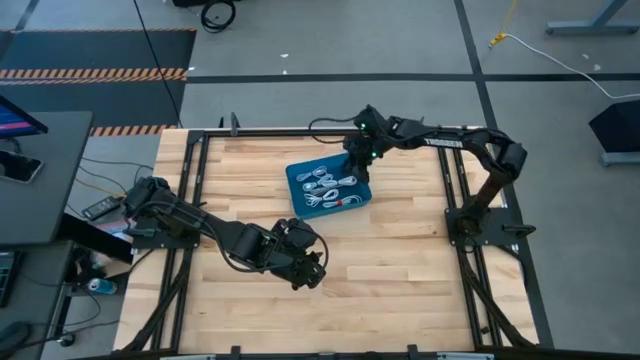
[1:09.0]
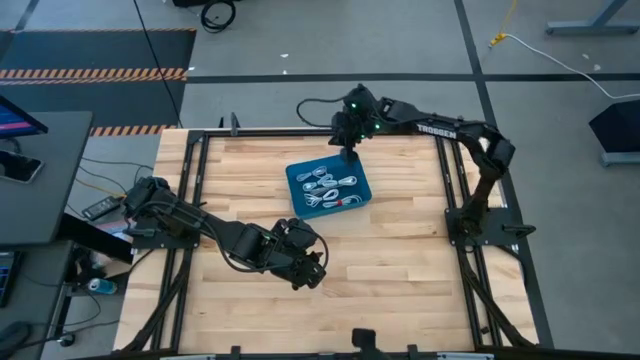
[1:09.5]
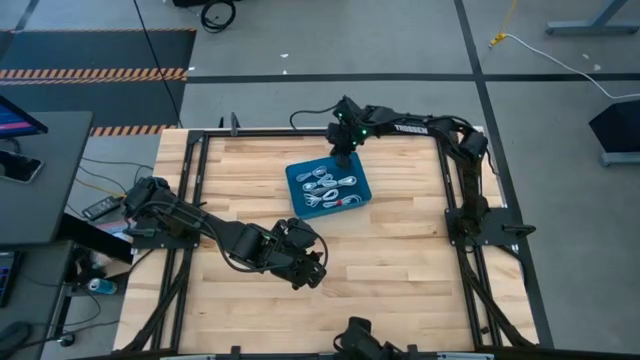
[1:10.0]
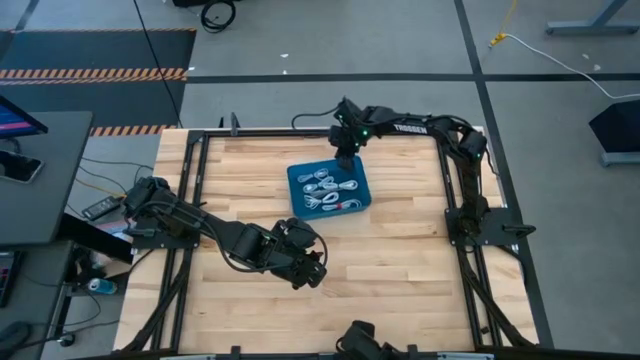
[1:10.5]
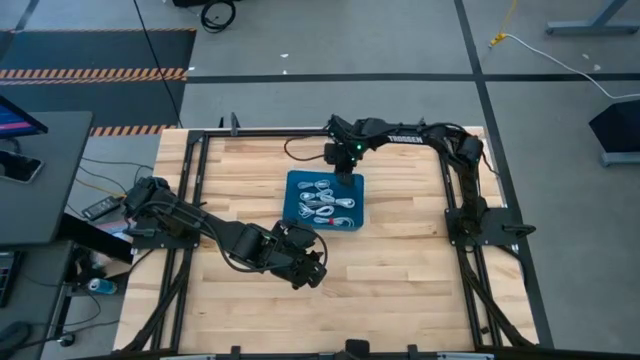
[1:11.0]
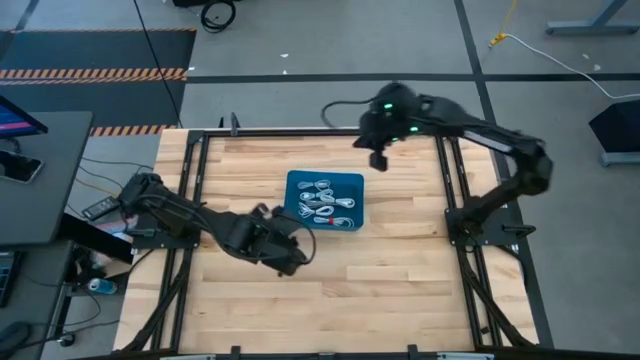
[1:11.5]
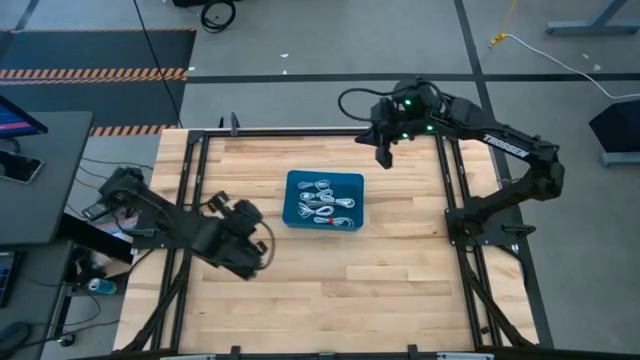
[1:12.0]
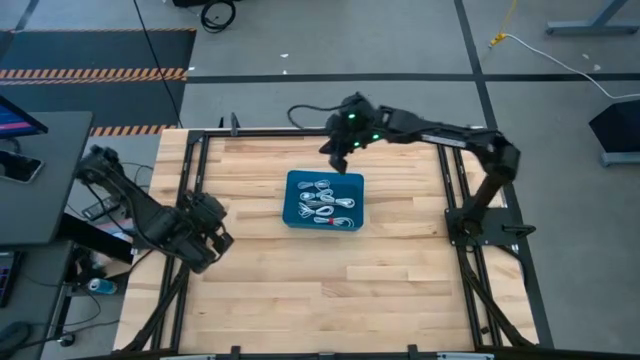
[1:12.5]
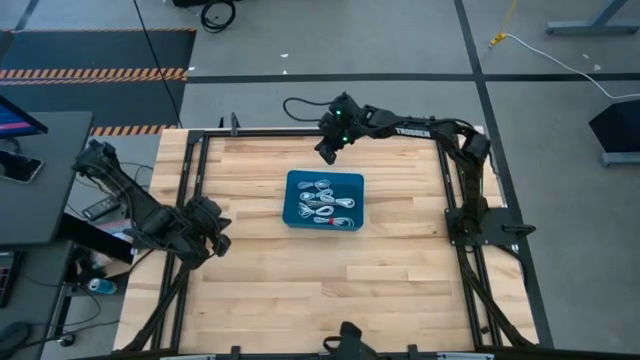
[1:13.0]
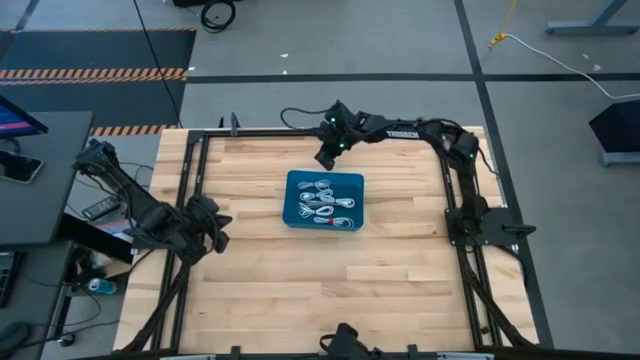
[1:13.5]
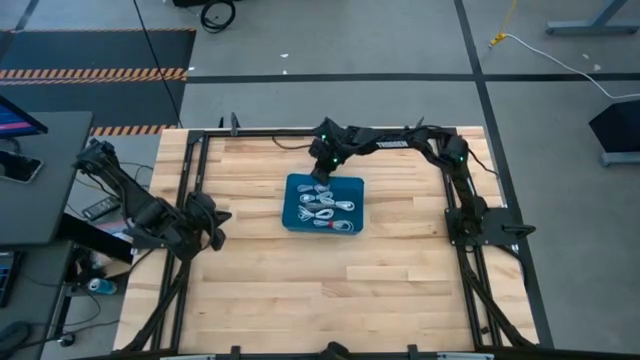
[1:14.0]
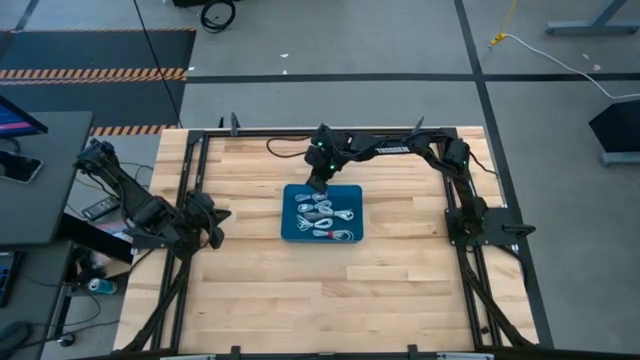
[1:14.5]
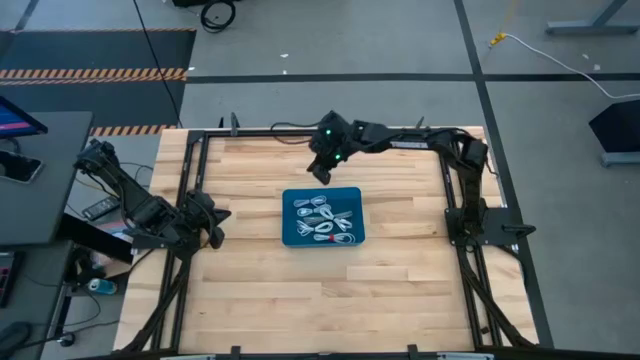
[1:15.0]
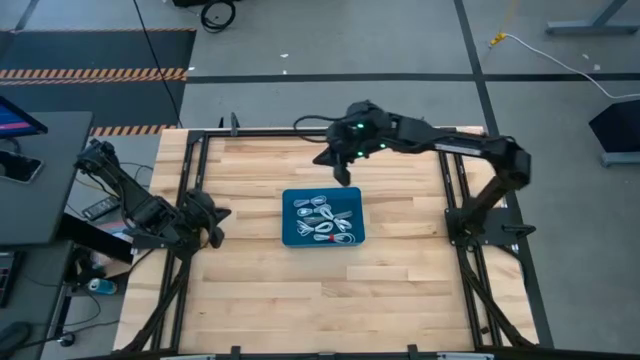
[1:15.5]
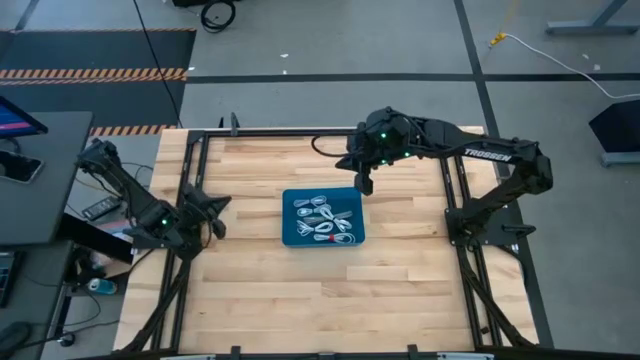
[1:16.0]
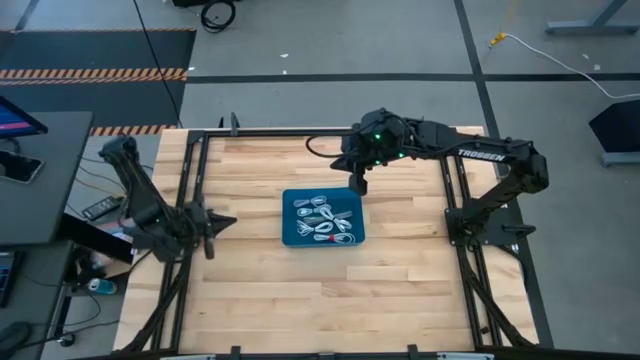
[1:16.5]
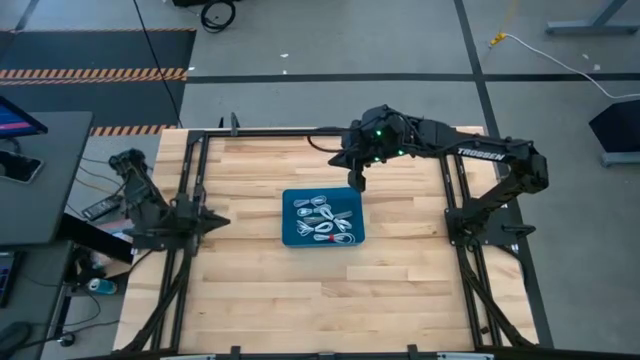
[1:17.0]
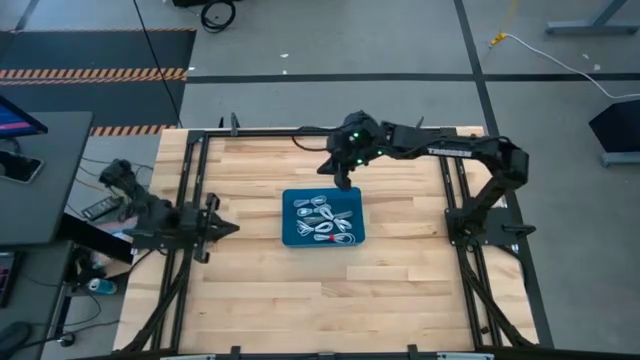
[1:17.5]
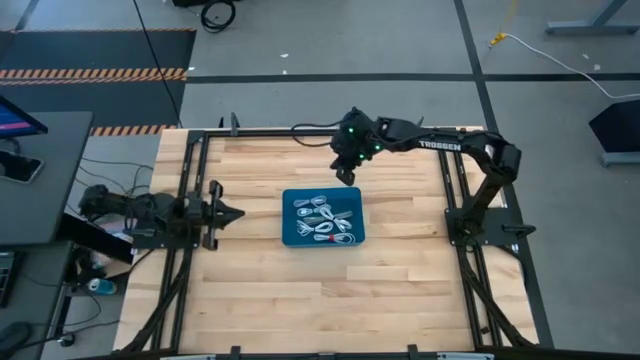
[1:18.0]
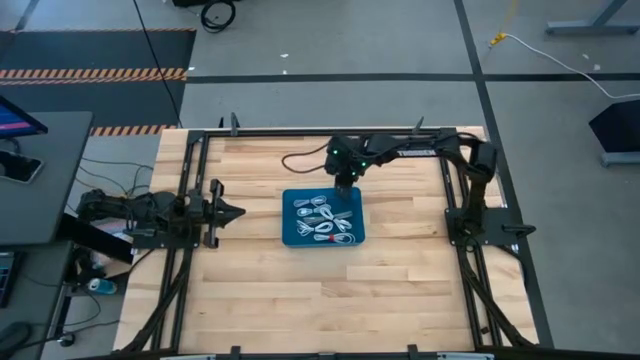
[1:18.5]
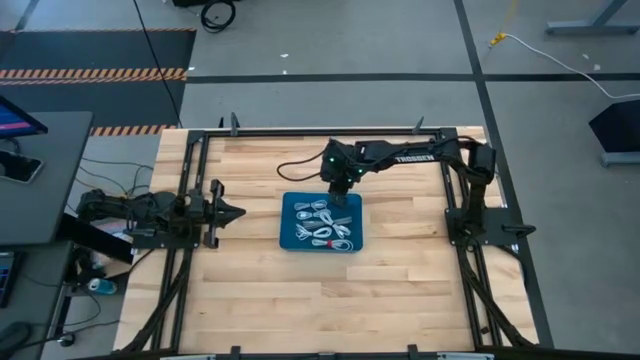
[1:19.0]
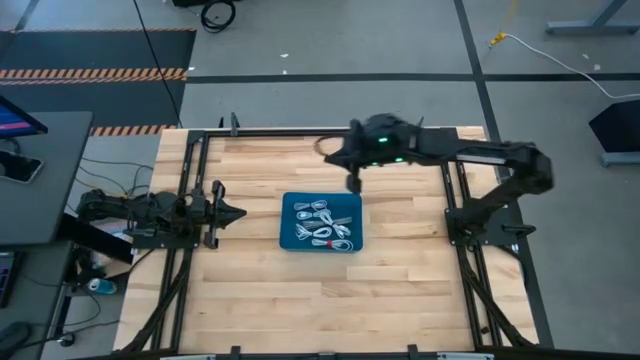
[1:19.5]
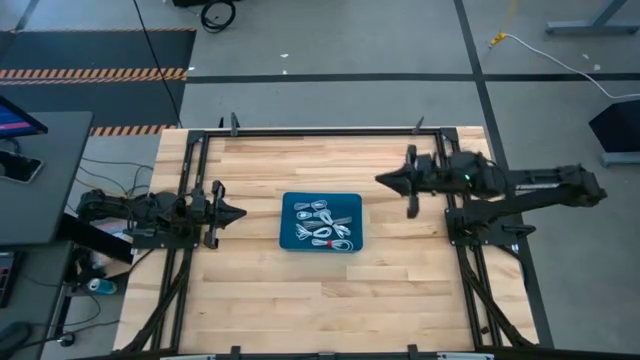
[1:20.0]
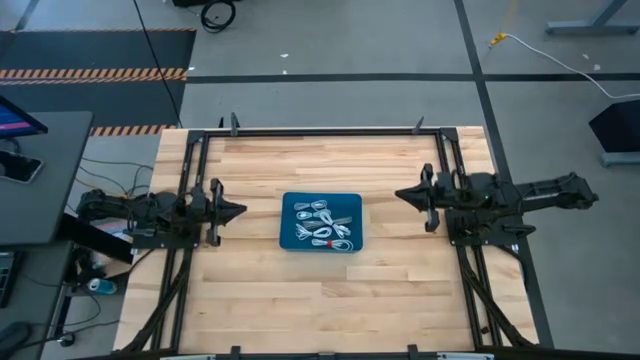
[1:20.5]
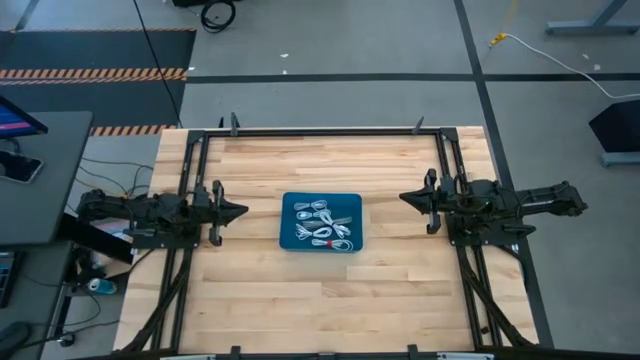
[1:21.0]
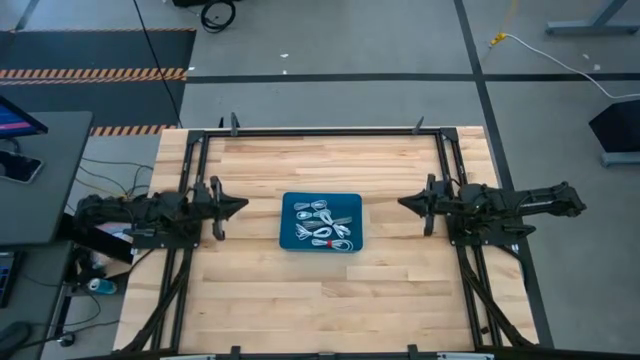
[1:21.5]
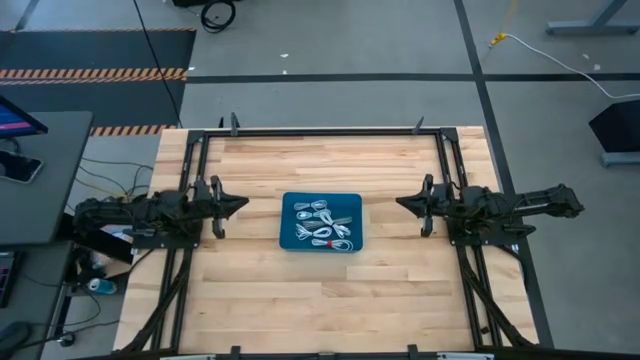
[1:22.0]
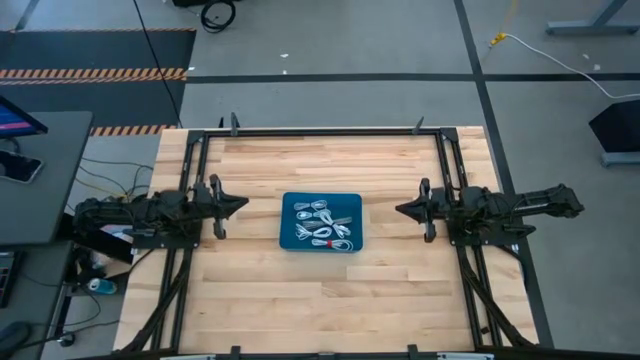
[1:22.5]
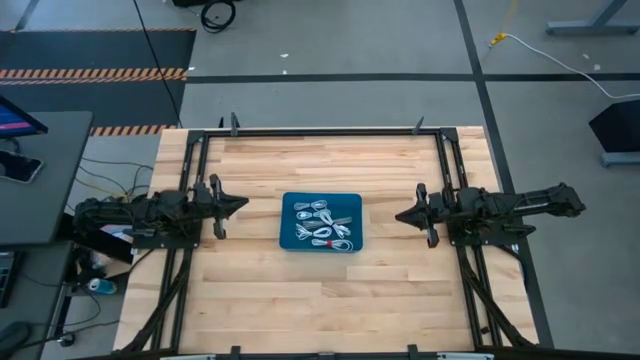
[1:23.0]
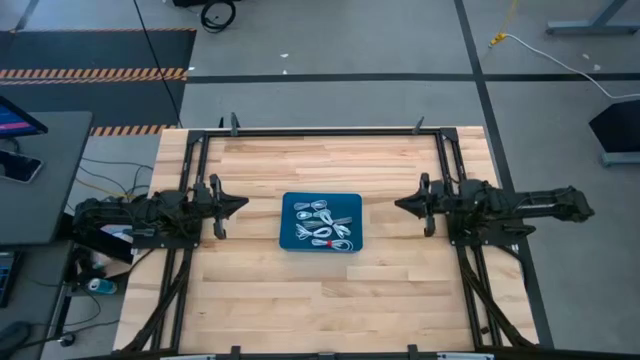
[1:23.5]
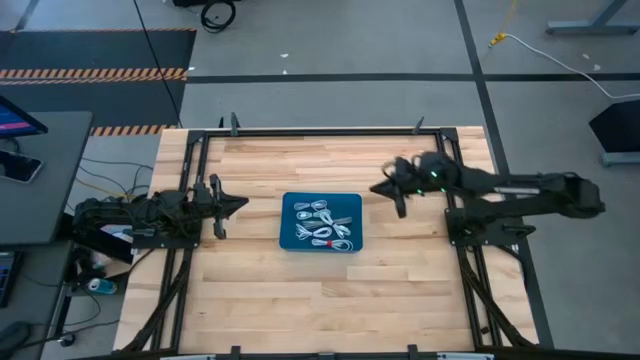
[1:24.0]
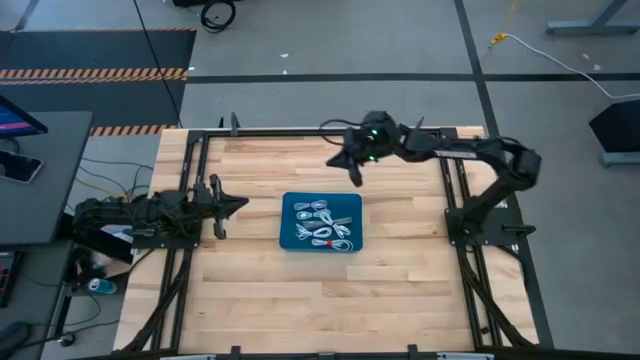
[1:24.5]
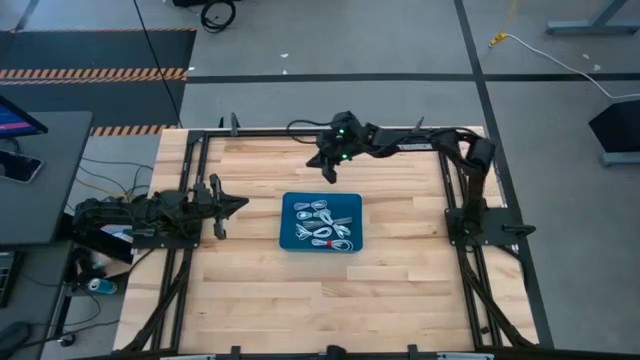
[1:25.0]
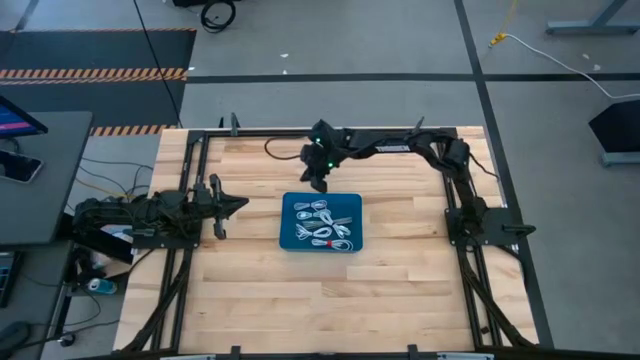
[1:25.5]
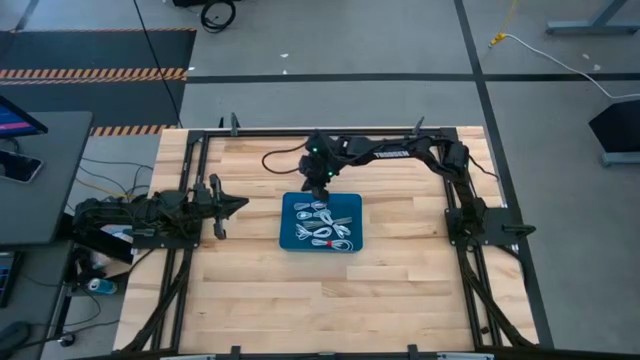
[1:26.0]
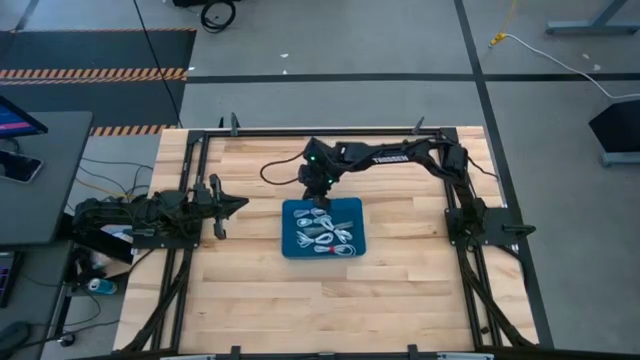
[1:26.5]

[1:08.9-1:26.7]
Task: Pick and place USB-C Cables
Adjust the bin into the center of the table

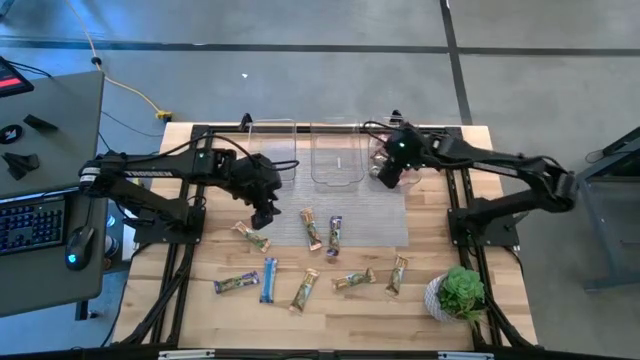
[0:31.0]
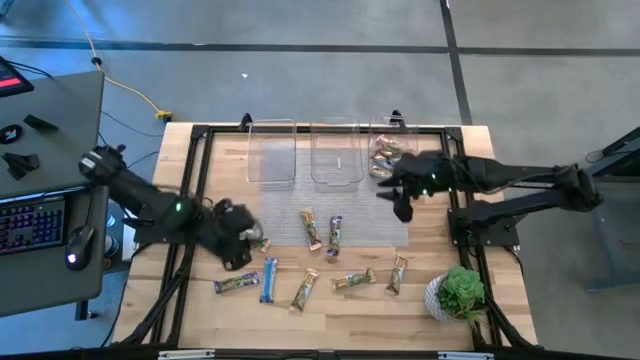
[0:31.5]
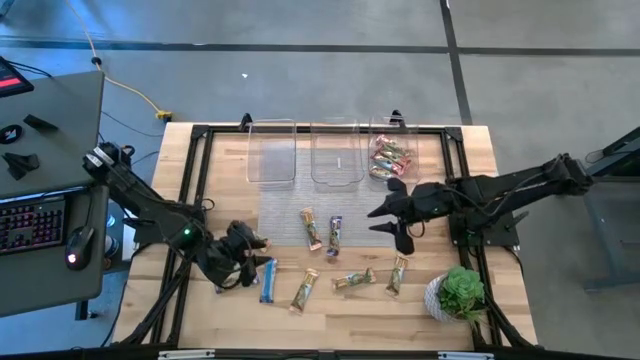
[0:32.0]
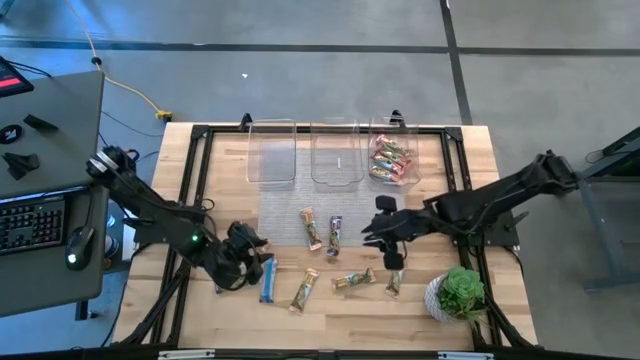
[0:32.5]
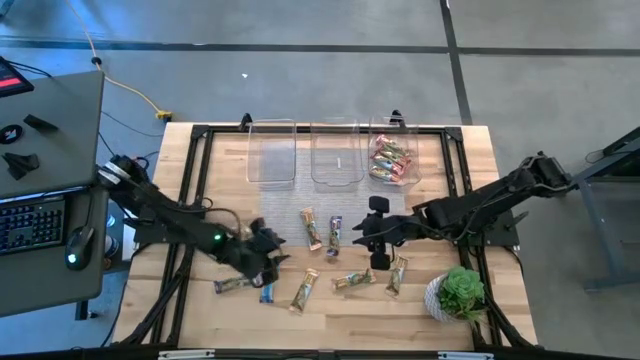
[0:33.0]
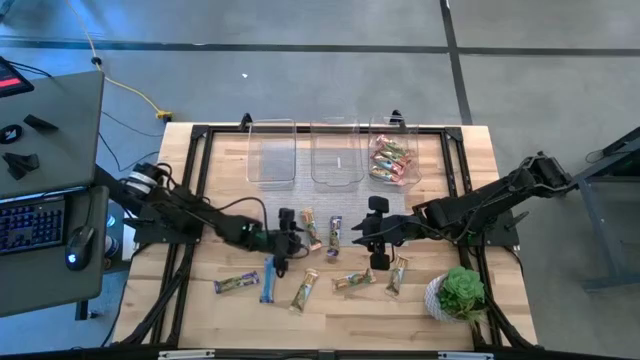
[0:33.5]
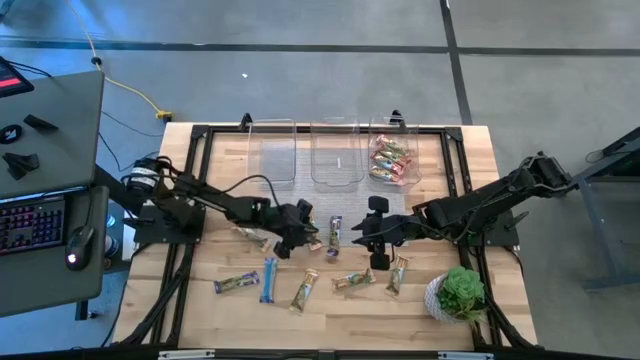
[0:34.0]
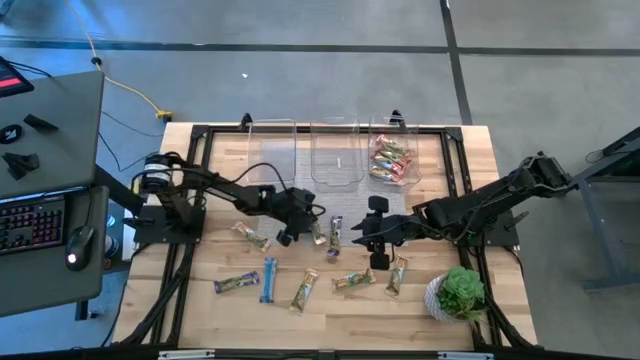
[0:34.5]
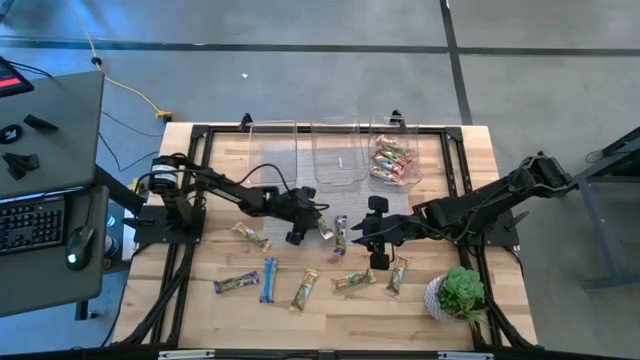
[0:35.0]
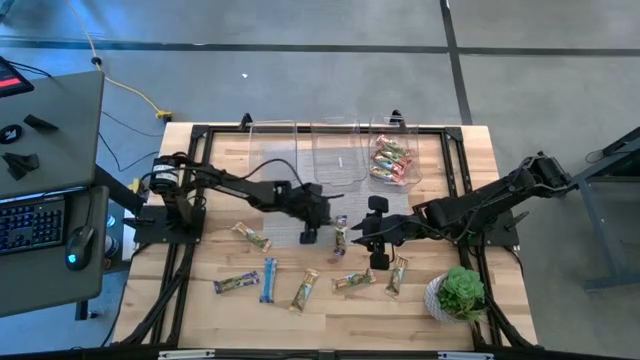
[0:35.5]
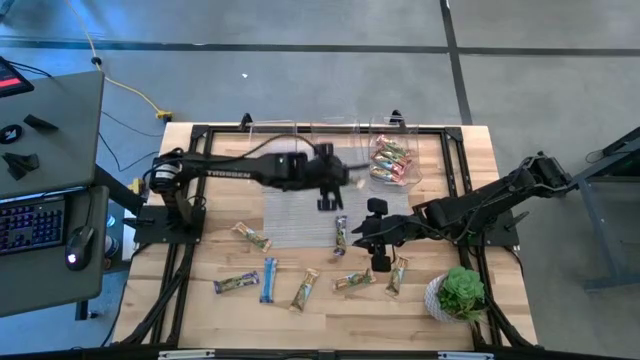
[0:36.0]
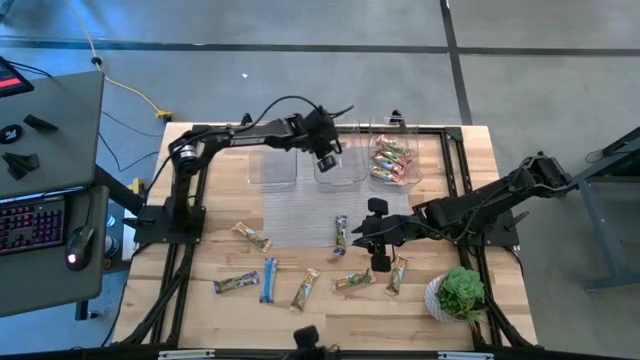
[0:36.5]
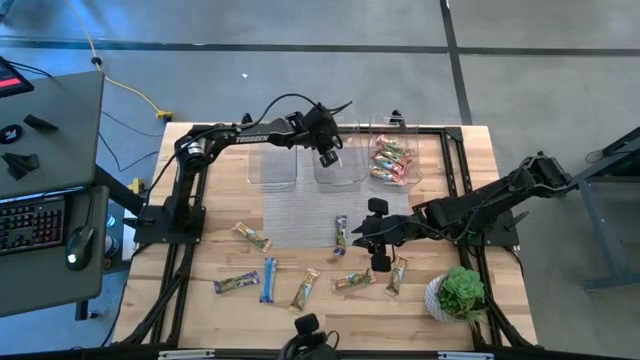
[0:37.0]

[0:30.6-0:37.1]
Task: Pick and place Granola Bars by type
Put the orange granola bar into the middle transparent bin
